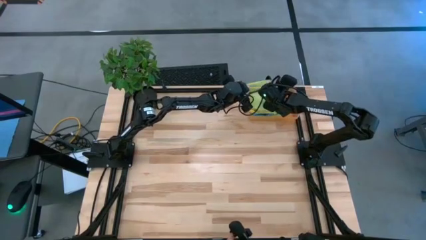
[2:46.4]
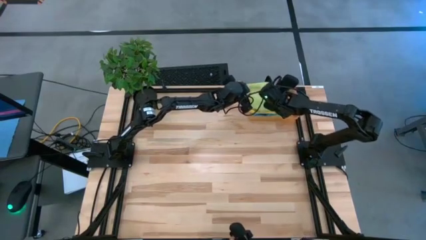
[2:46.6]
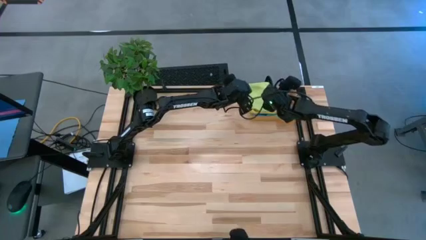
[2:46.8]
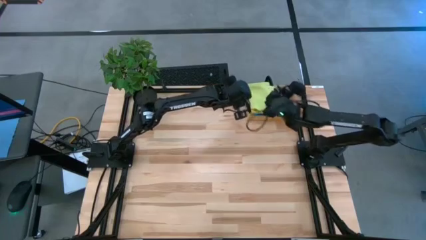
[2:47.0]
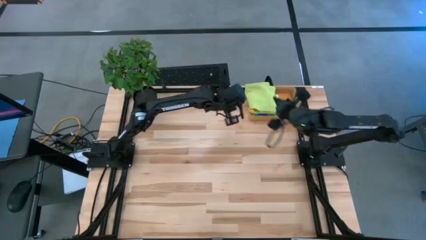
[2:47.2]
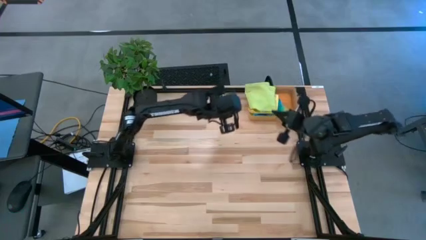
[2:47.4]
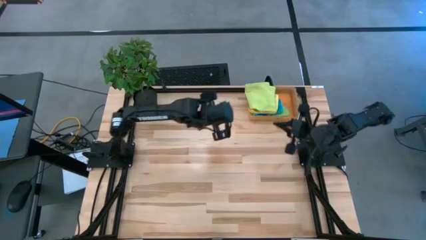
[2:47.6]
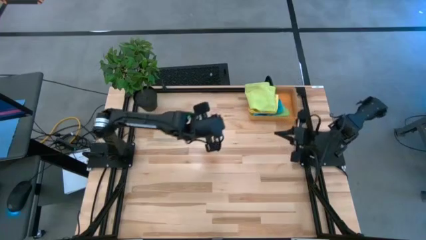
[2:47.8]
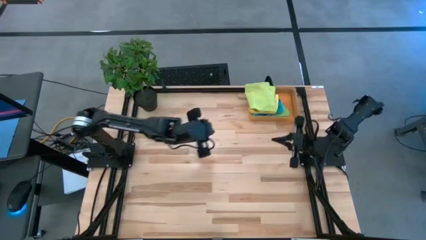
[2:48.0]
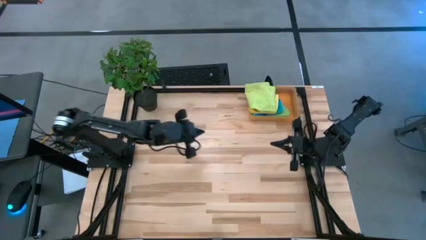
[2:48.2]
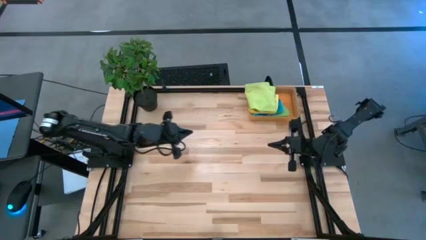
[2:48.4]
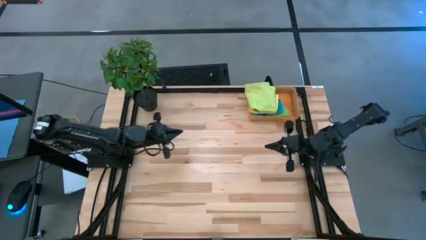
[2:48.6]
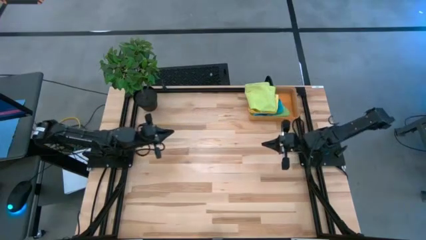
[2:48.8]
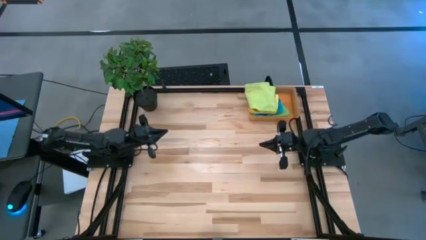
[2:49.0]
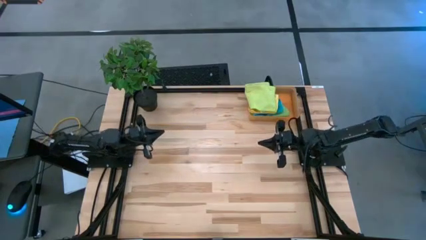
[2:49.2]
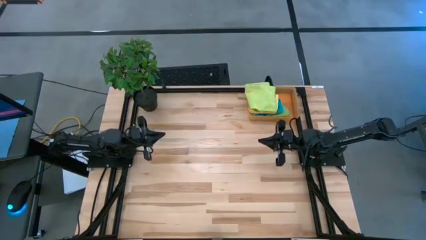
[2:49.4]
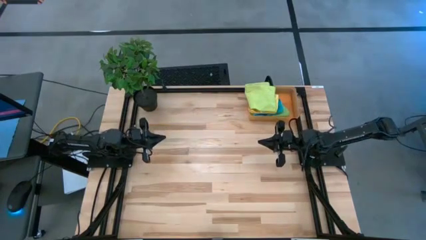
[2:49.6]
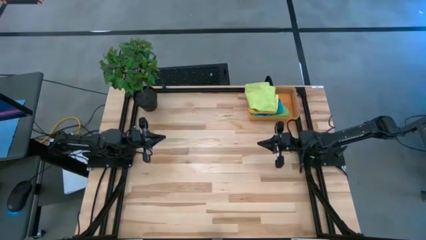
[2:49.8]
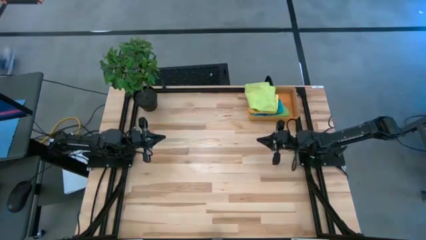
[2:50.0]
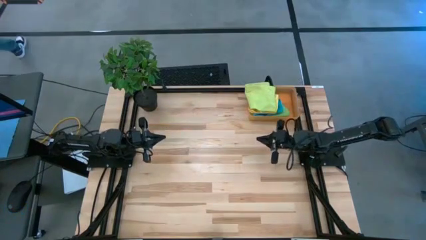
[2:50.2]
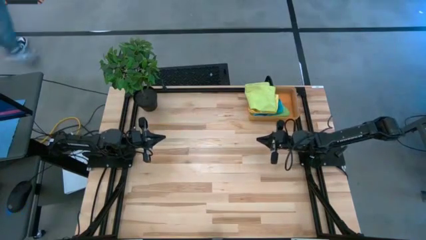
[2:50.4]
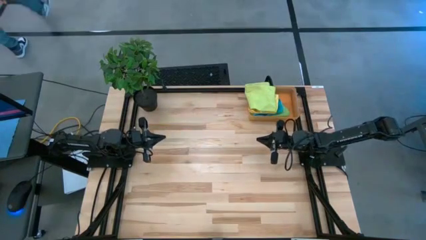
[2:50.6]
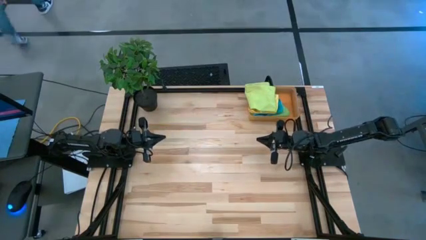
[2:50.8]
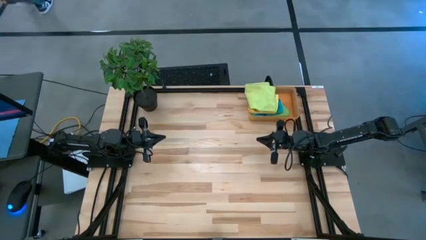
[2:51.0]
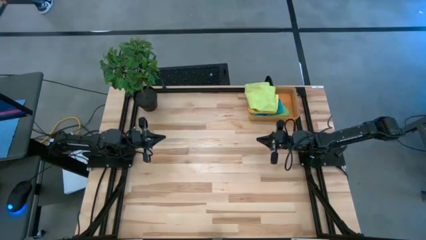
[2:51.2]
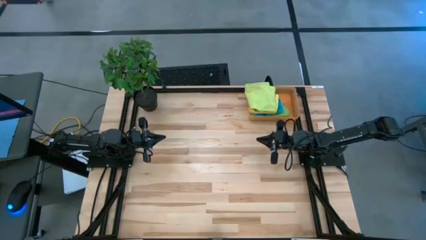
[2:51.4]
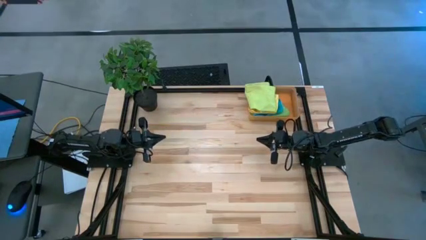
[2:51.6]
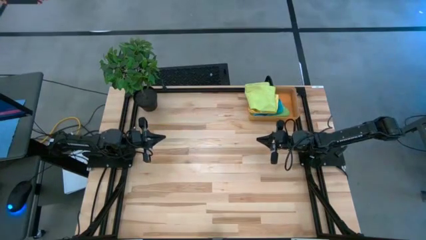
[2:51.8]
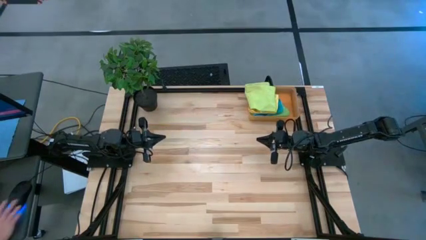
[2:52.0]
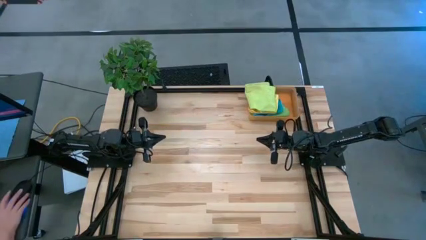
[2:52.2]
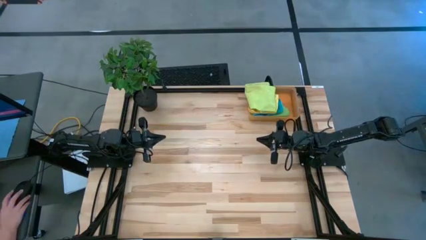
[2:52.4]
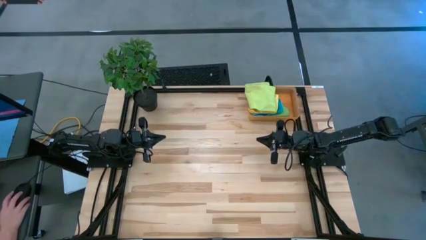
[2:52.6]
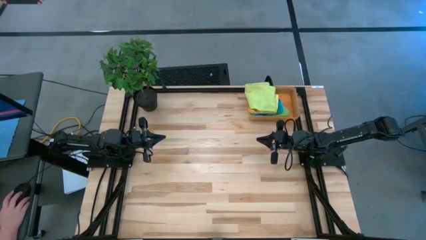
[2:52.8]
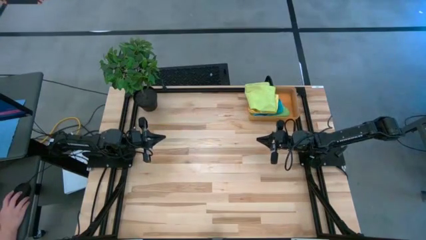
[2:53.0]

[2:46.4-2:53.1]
Task: Fold microfiber towels
Return to Home Position

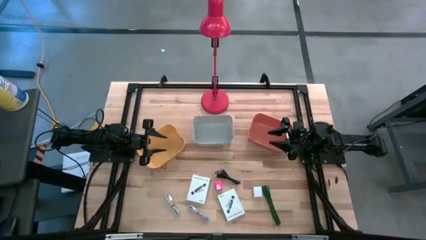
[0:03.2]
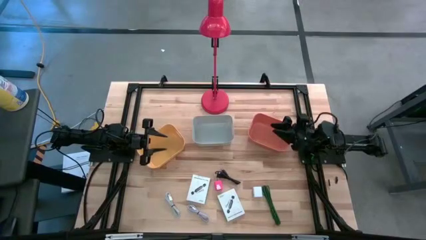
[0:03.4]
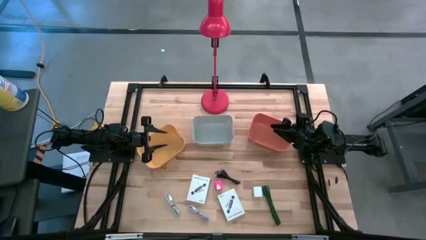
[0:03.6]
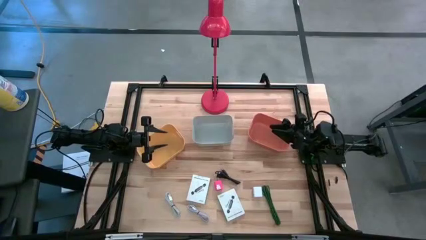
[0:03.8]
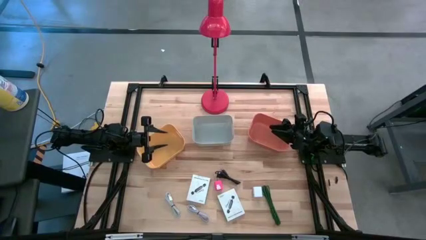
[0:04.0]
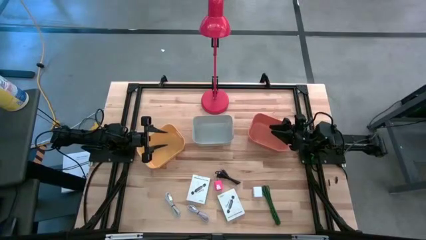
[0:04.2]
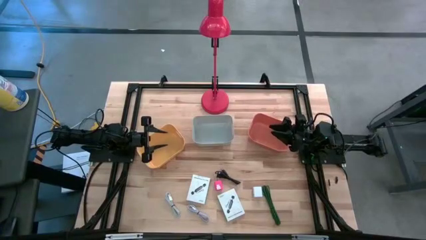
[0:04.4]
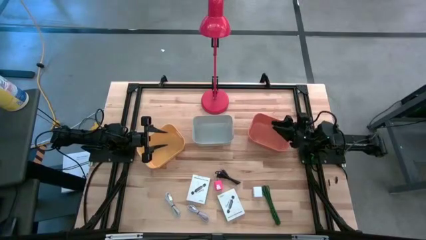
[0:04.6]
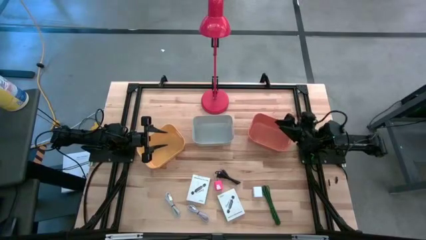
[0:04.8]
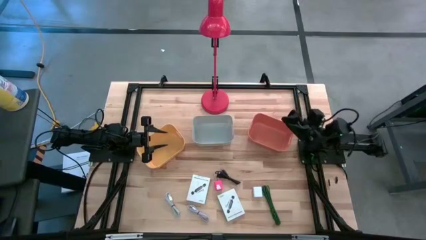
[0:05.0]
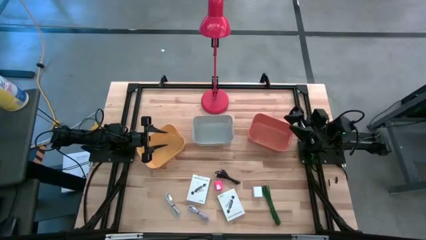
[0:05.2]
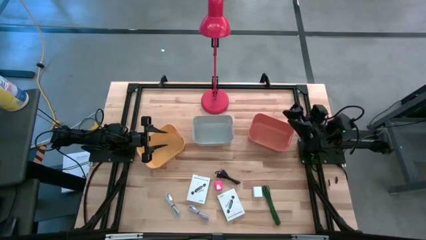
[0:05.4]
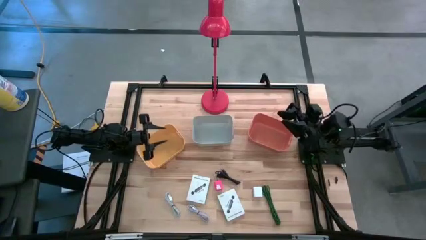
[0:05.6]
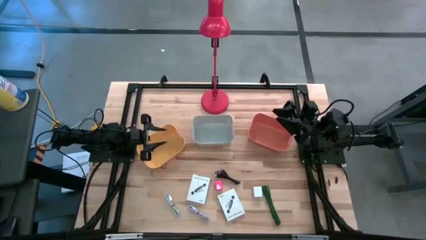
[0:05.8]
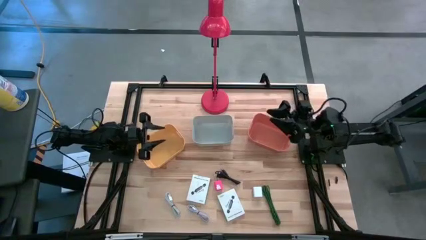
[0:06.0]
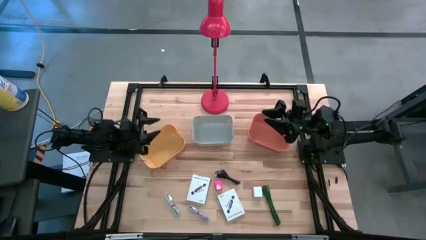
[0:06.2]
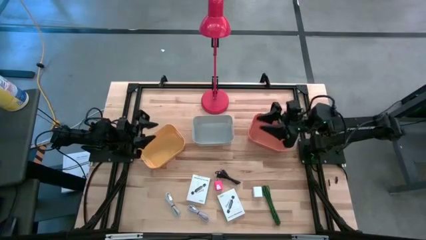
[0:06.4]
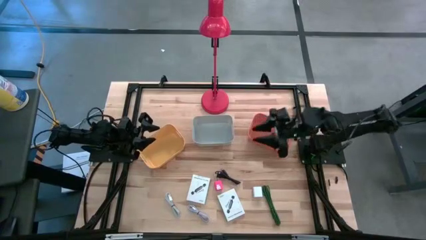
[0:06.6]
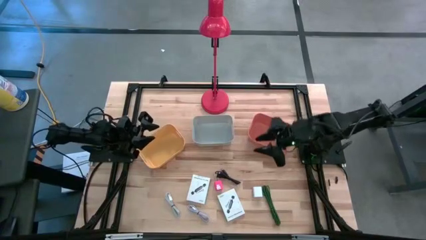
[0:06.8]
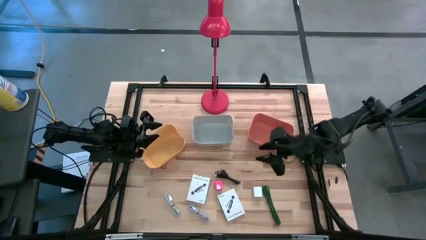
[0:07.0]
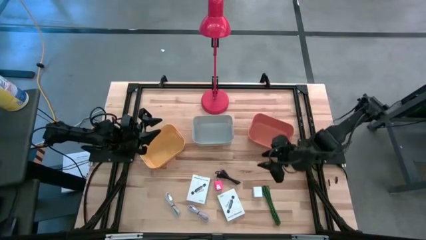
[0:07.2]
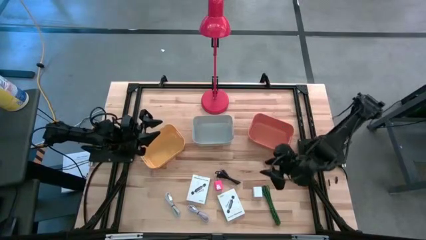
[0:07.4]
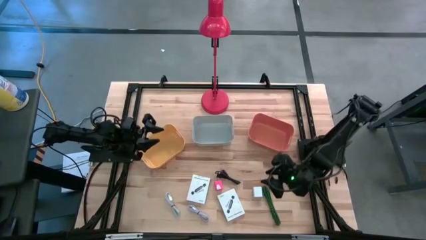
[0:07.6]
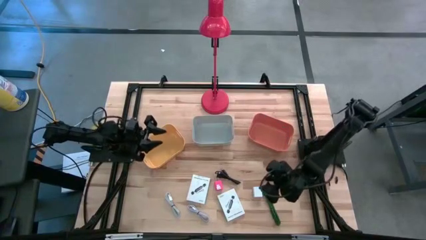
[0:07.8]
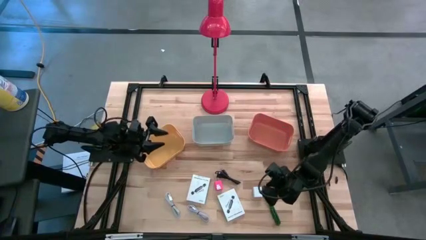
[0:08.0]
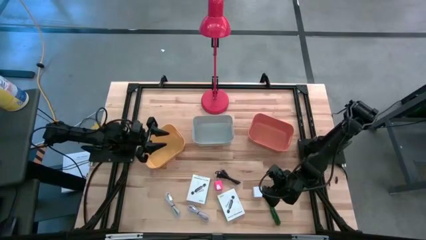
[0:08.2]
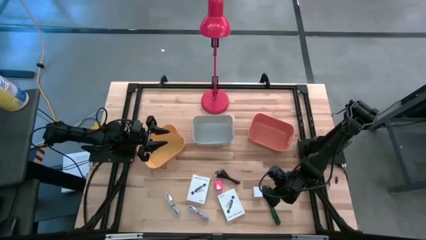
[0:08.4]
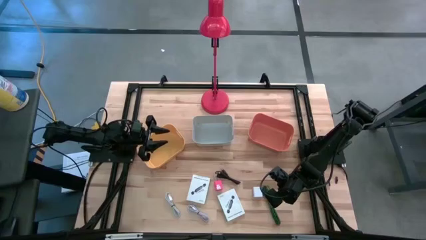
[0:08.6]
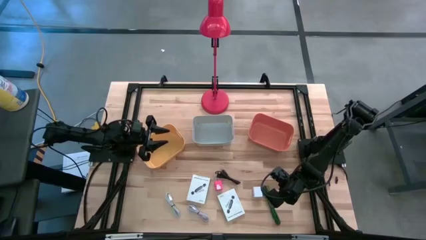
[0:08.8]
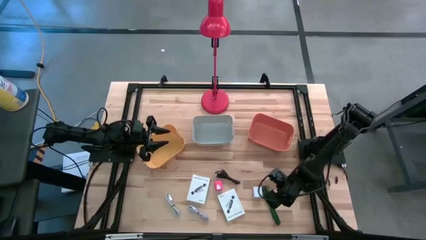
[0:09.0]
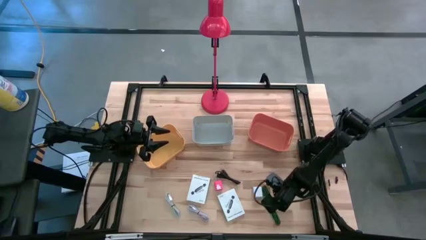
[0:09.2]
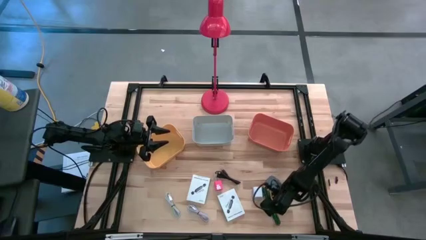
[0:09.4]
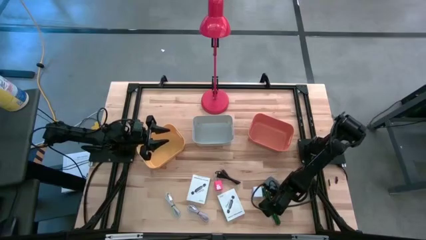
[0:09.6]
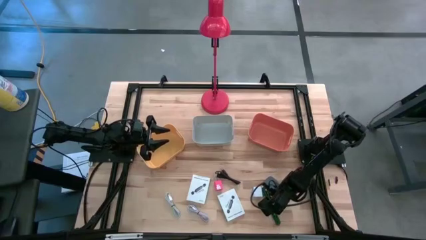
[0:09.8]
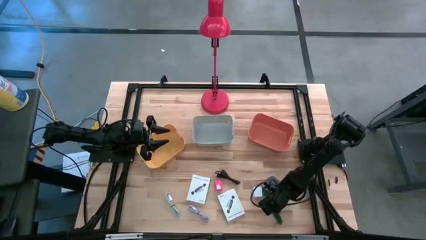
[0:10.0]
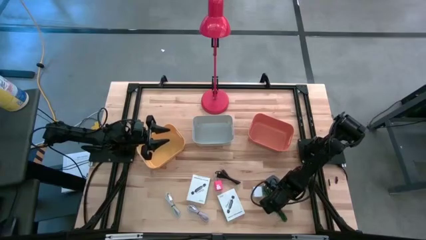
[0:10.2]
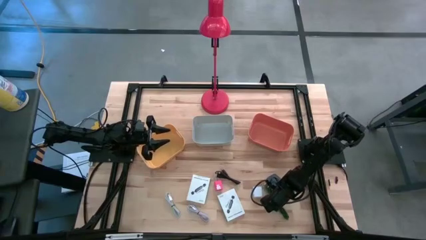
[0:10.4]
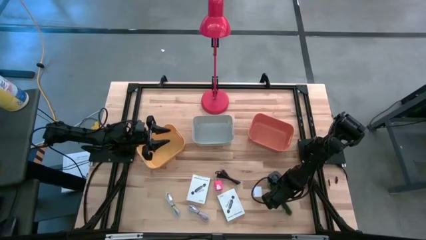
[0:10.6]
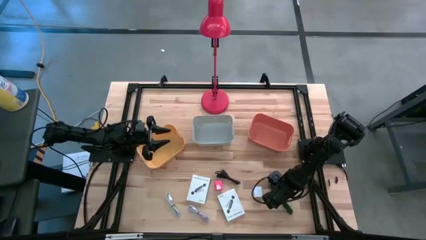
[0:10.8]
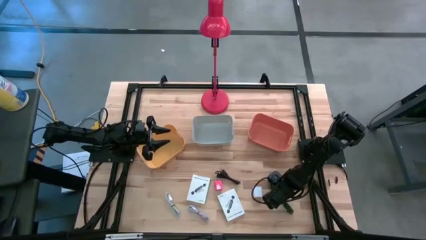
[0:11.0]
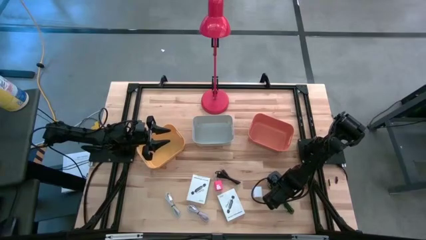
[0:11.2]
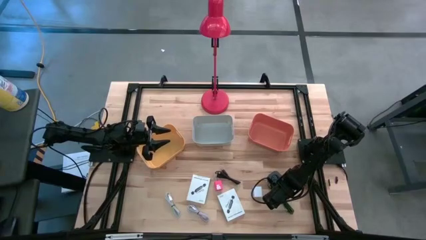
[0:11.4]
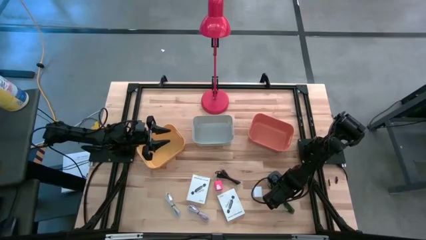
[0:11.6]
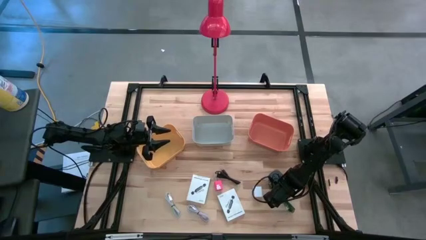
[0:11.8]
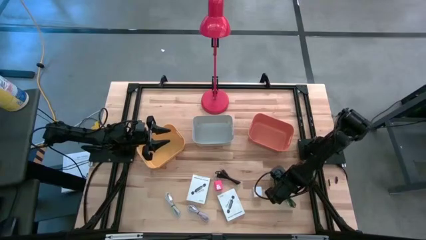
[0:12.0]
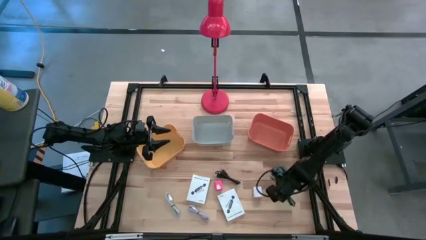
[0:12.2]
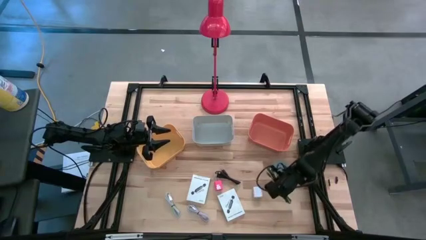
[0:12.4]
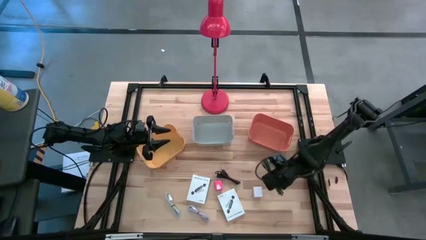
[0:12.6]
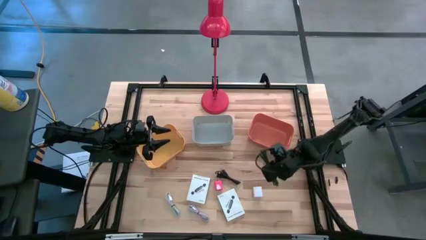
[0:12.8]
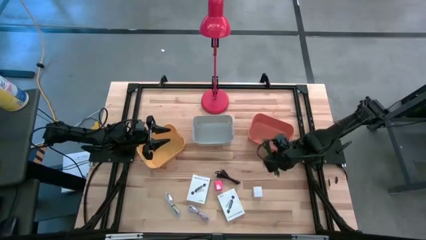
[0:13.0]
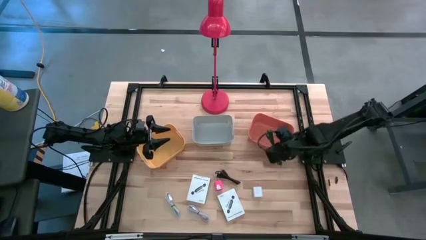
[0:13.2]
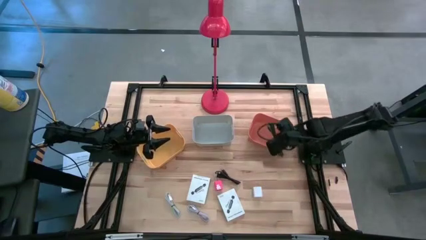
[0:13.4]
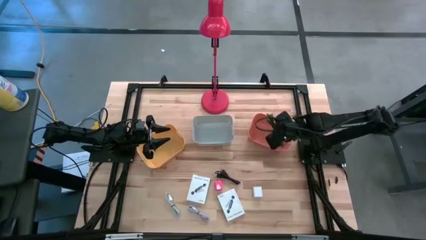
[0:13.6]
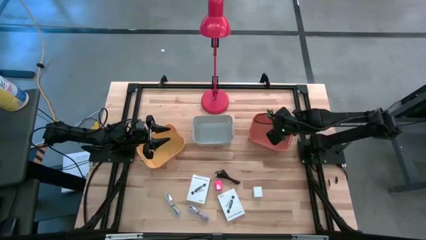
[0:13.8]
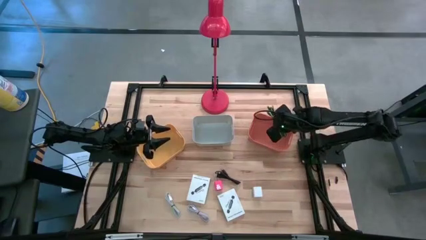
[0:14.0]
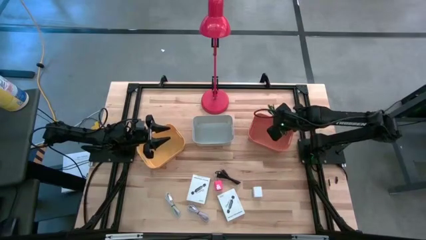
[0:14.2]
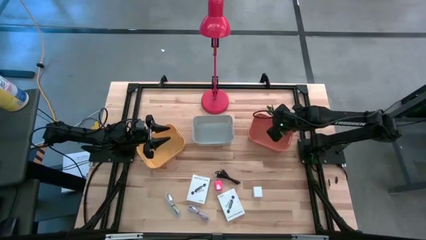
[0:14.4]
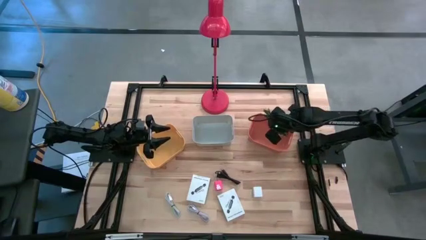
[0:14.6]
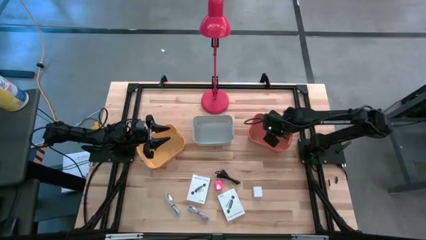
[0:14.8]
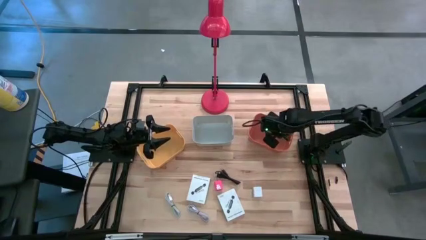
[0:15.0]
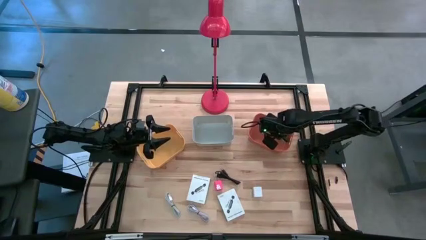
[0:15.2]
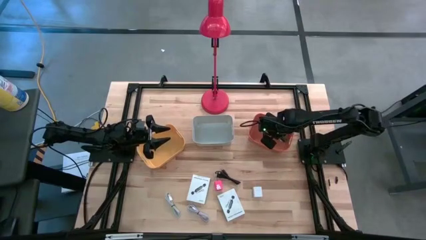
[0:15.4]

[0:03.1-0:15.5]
Task: Pick and place items into bin
Put the green charger cable into the orange bin
